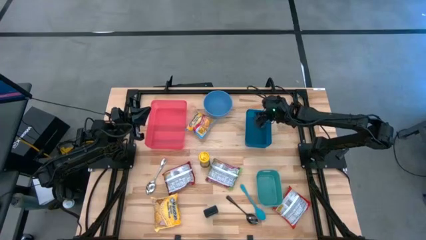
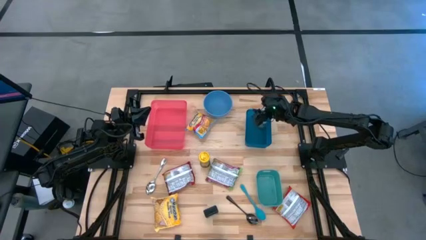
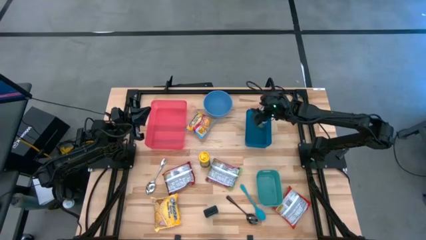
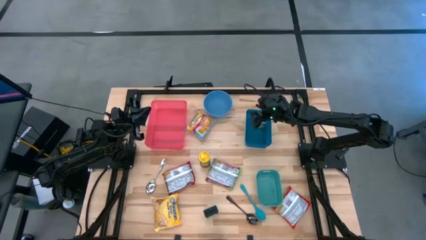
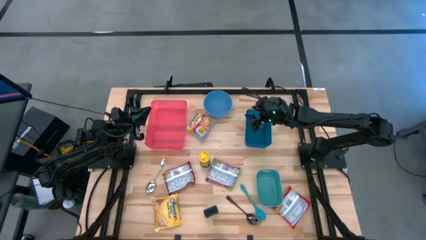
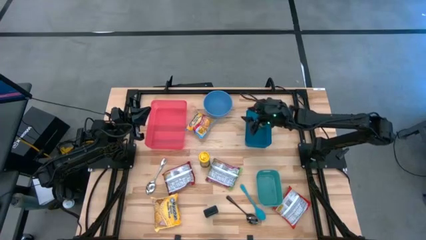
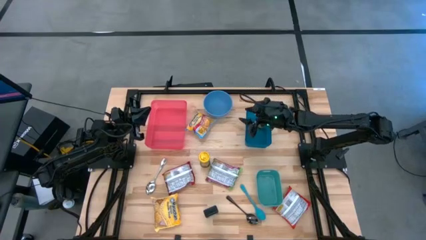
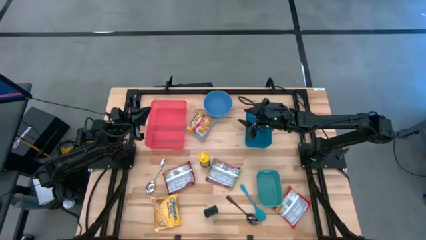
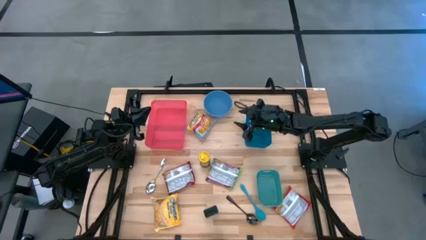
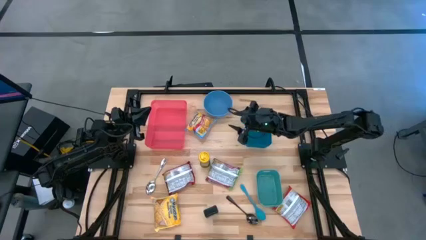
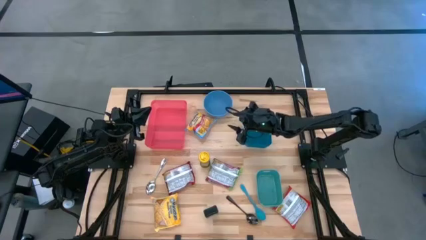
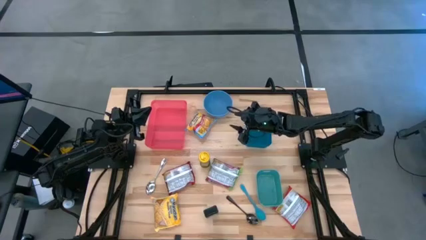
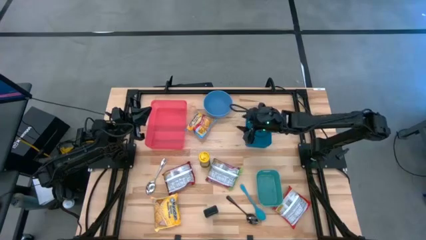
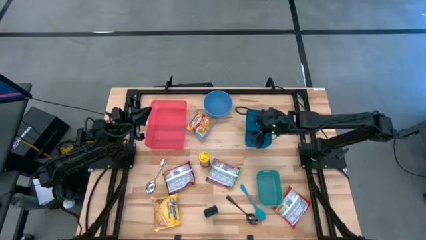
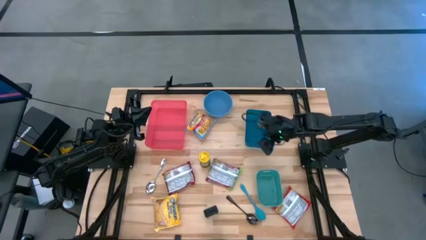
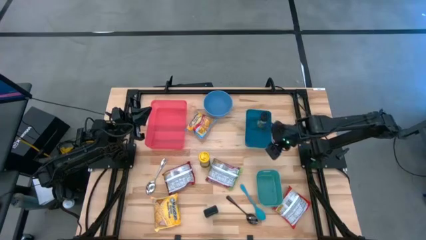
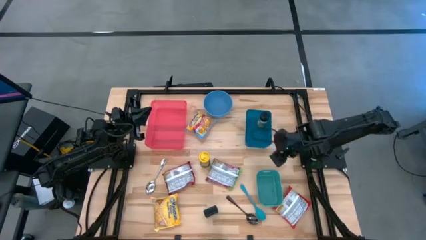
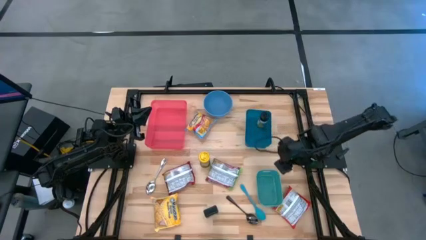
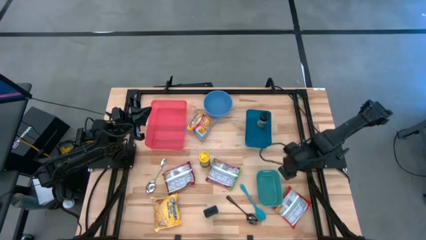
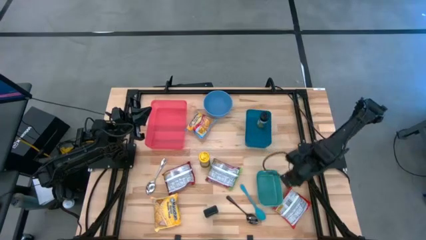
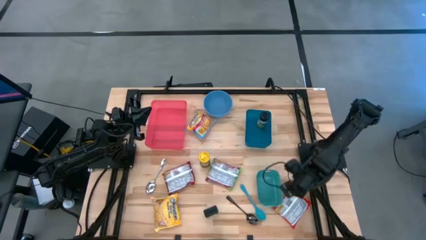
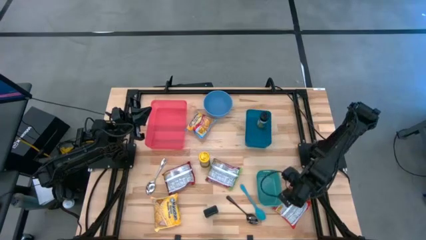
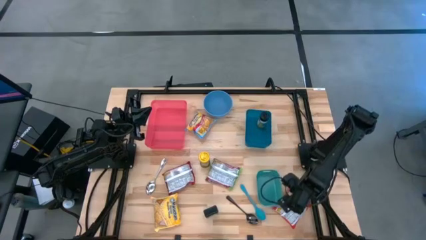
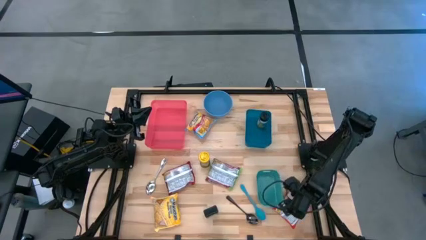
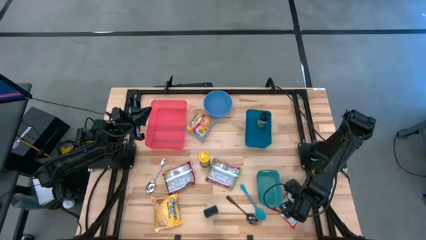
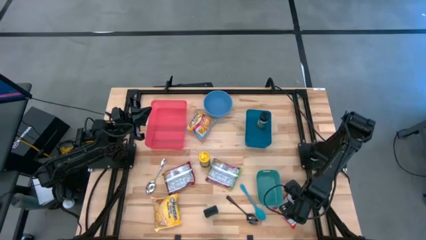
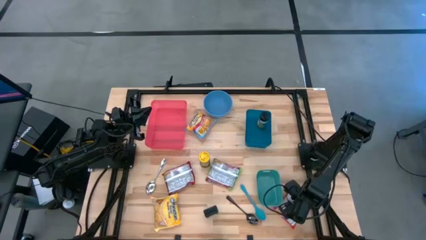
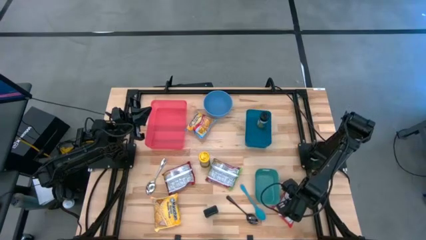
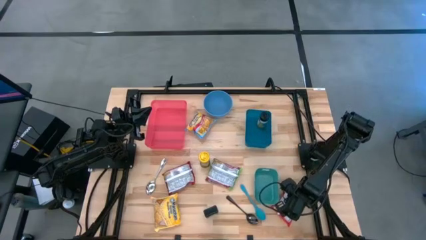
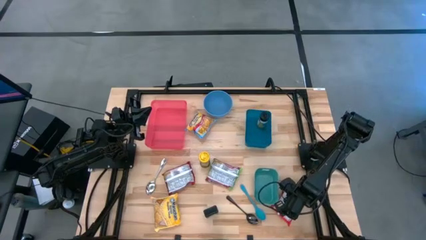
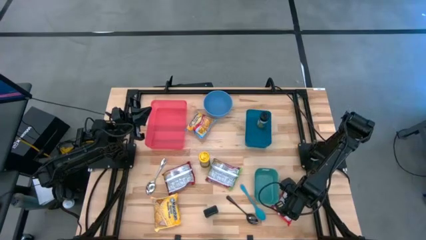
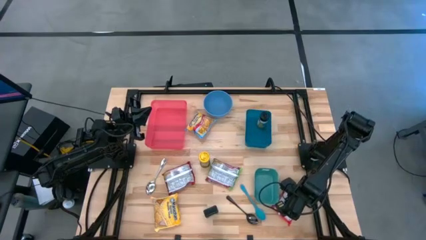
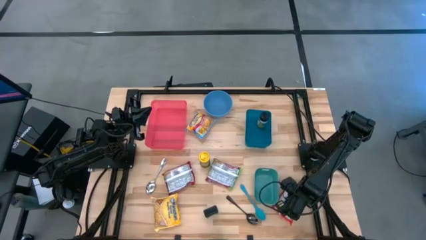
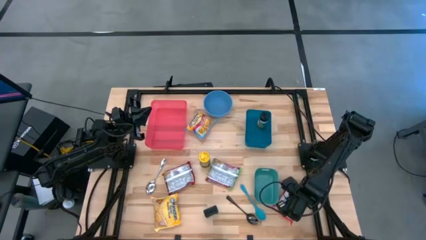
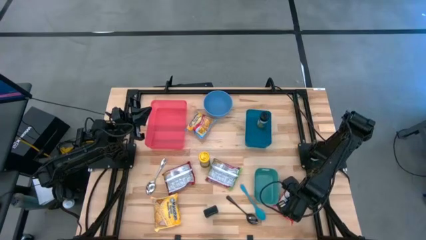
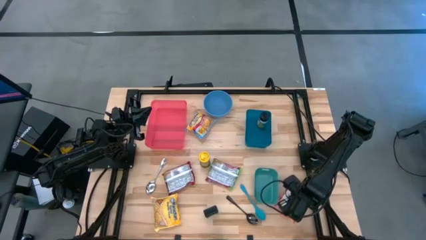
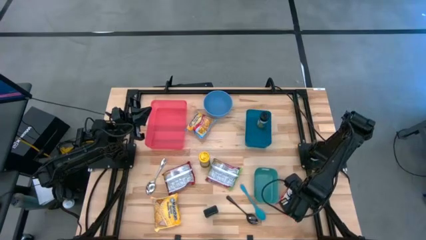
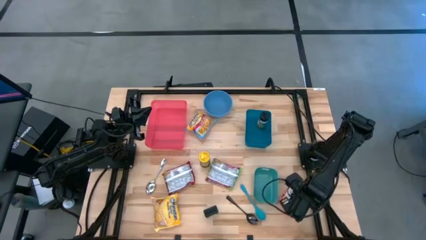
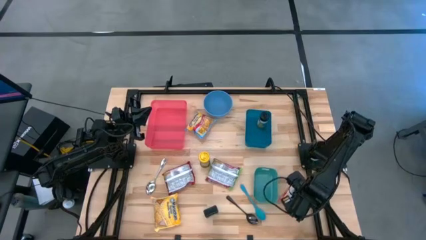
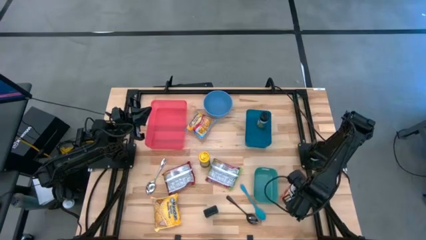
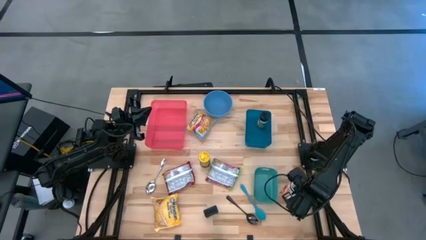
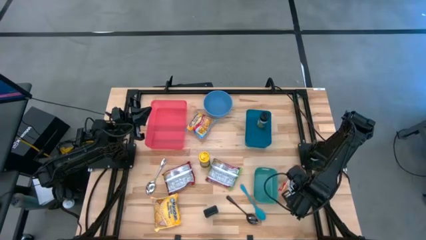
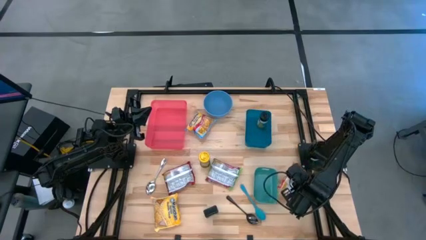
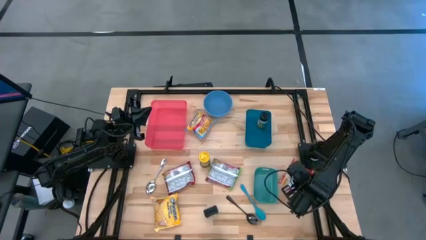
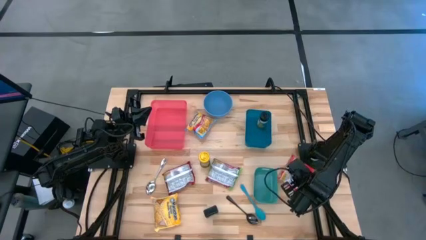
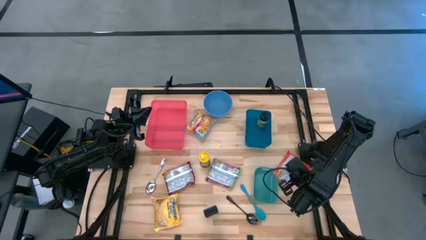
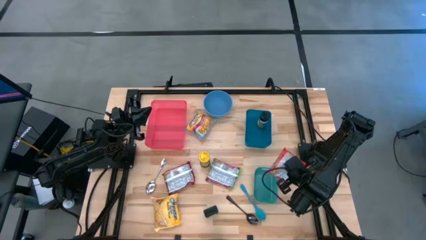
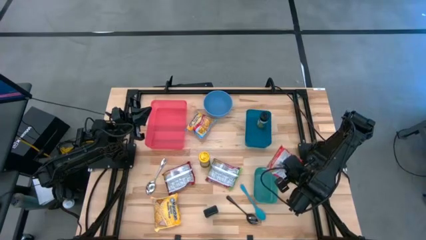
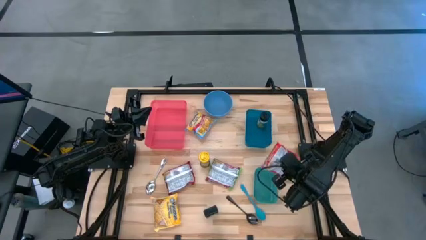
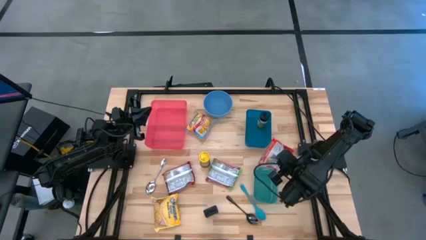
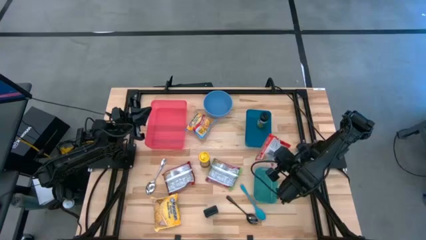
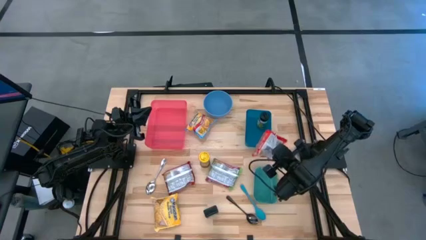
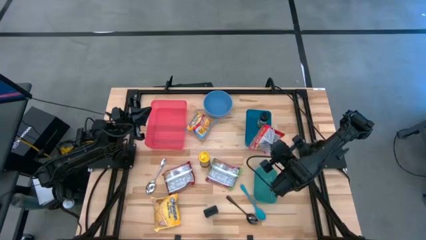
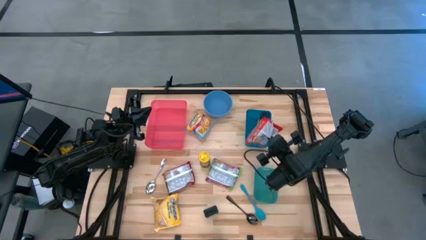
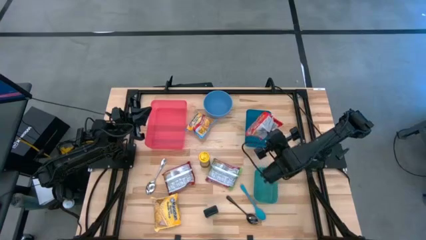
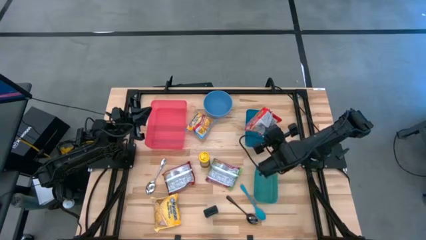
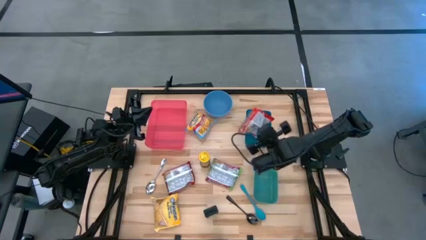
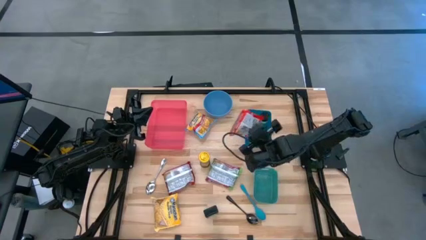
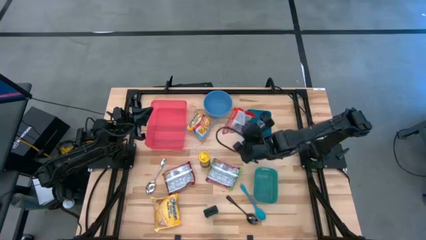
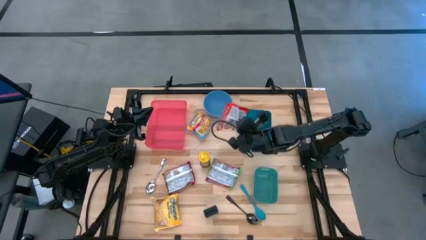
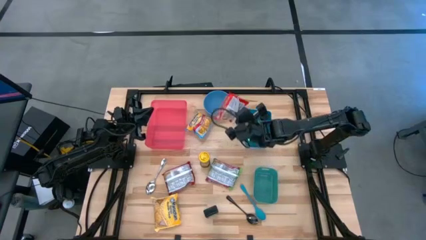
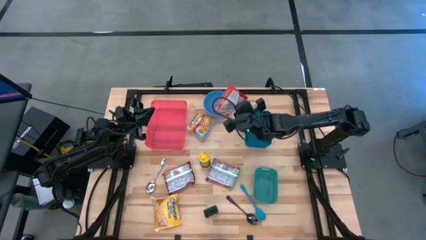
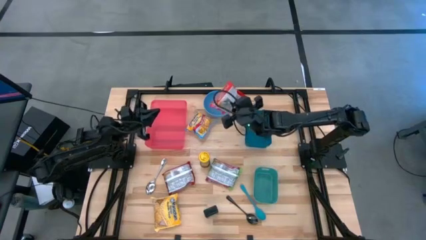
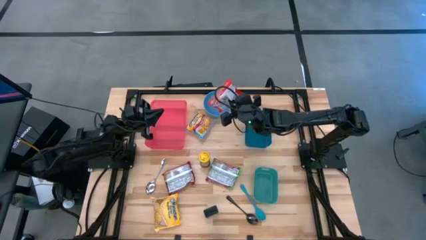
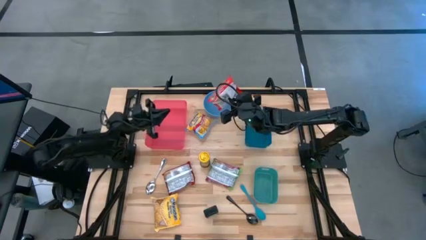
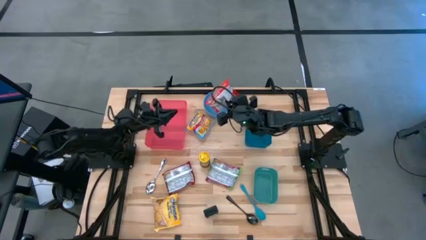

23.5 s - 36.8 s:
Task: Pick & Place Food Item
Put the orange noodle pack into the red bin

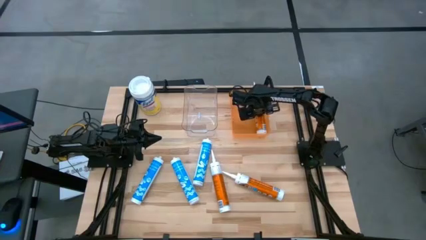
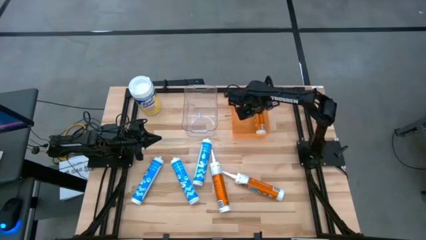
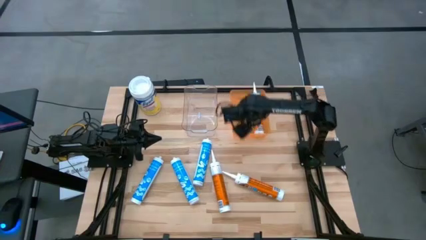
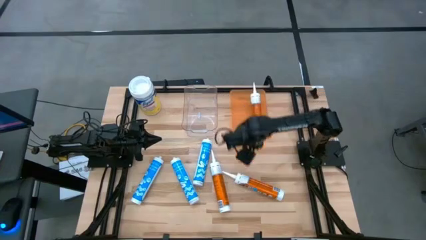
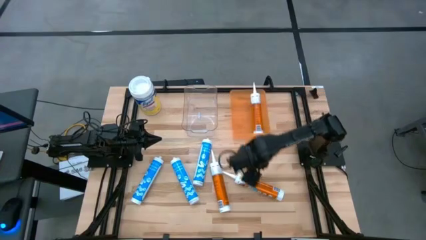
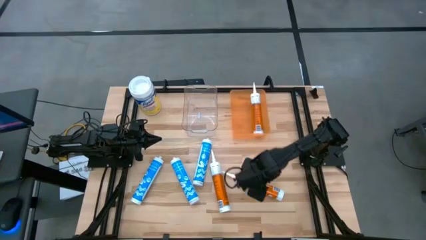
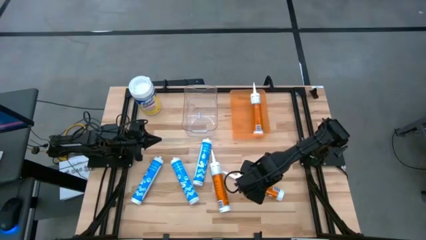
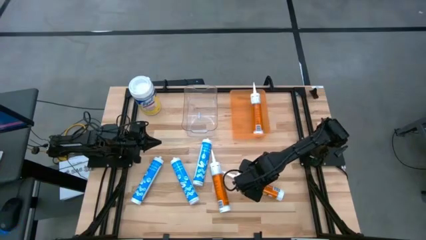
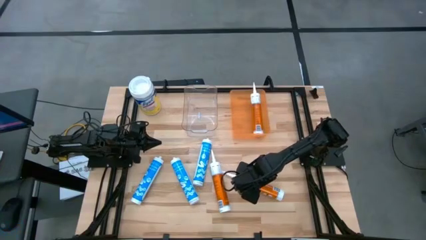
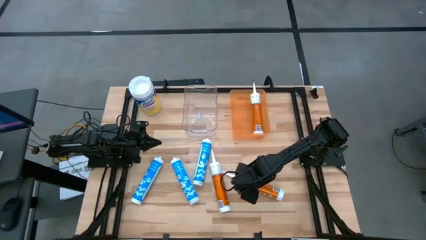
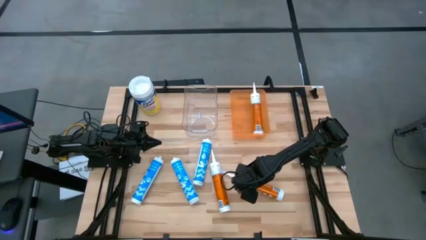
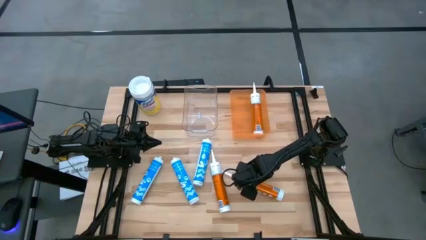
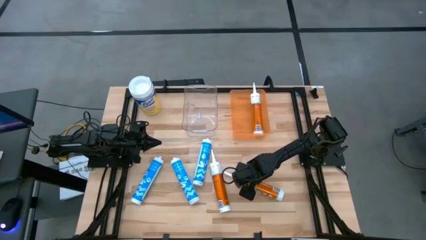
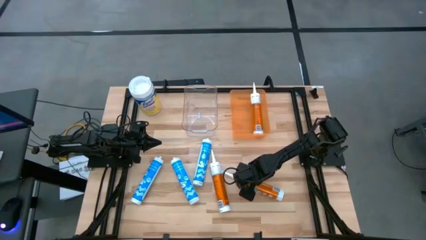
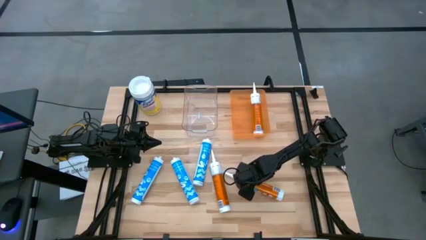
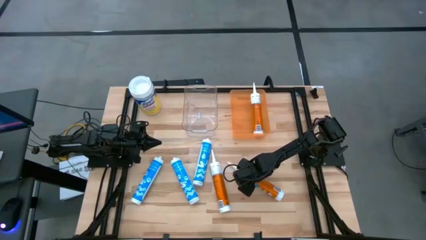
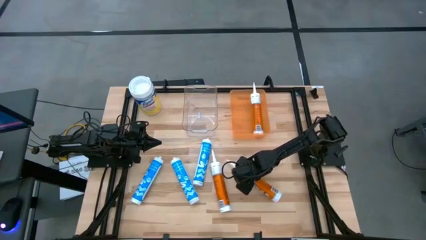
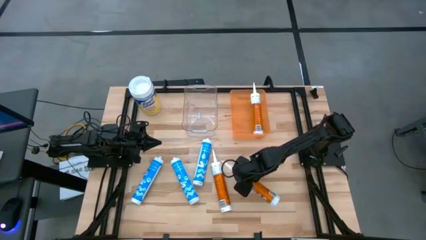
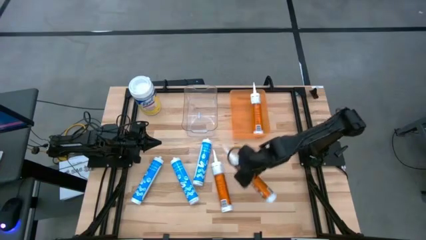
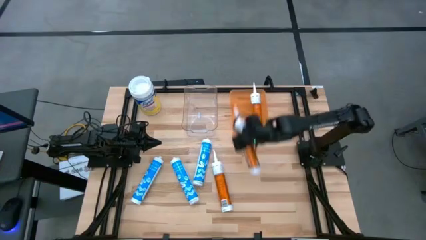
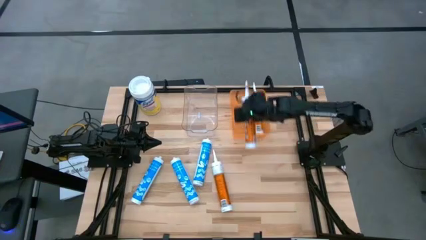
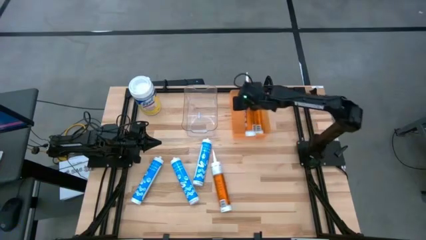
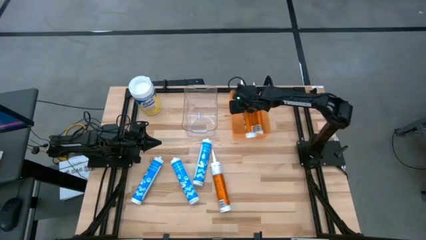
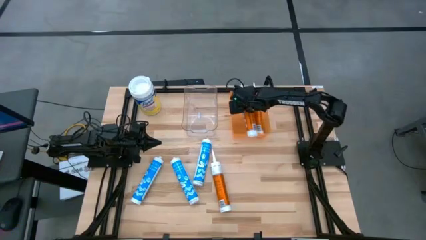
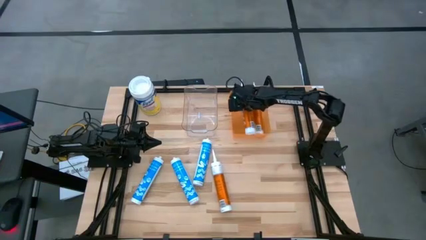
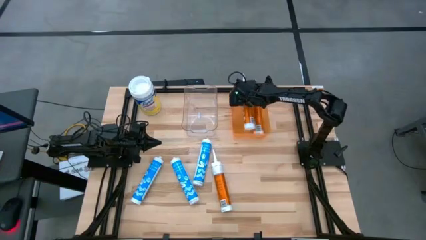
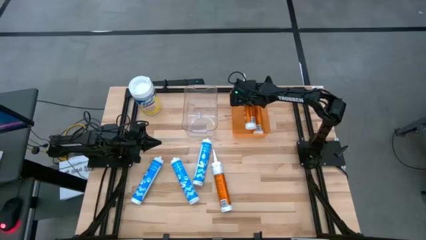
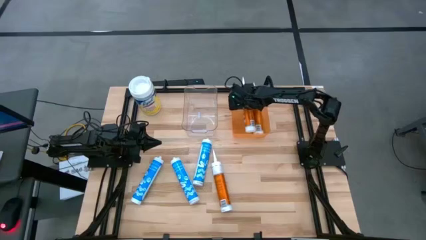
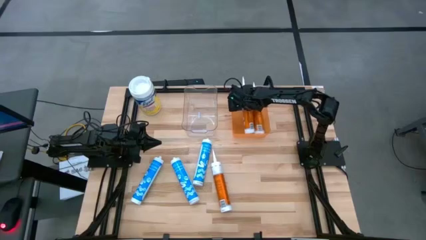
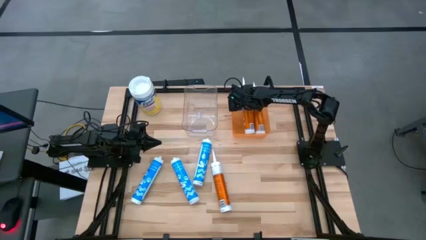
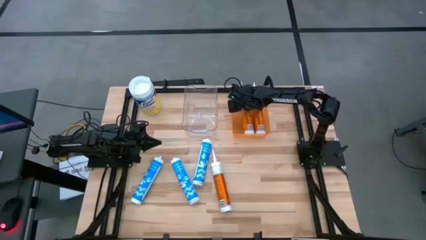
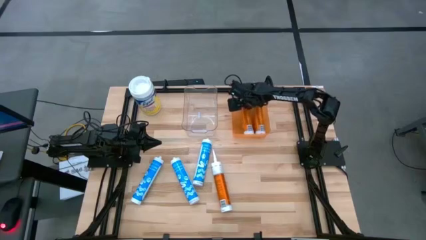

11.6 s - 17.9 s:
Task: Pick & place silicon tubes, Sealant and Lysol wipes
Put the right orange sealant into the orange bin
